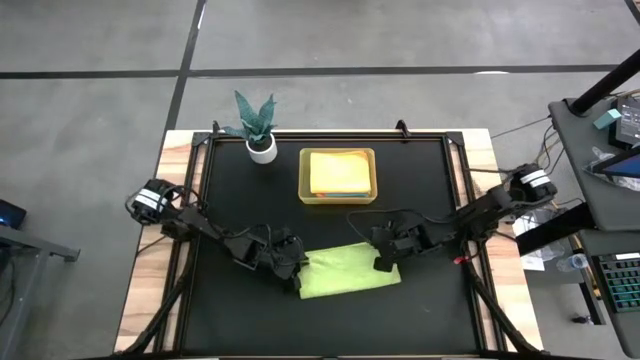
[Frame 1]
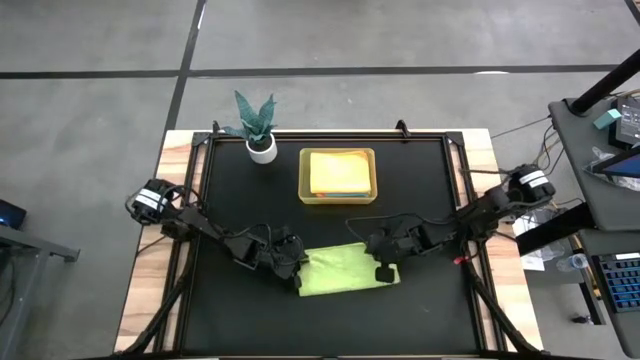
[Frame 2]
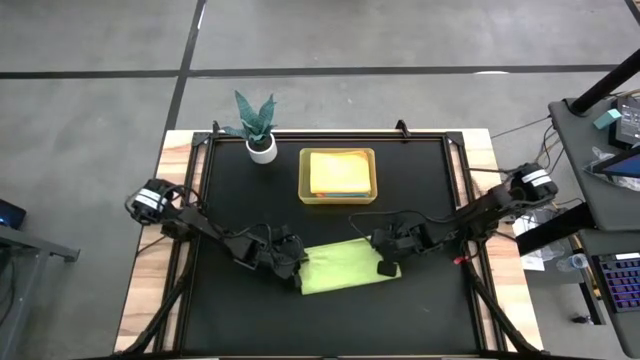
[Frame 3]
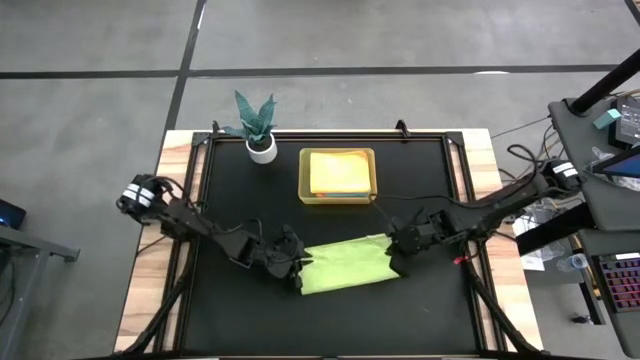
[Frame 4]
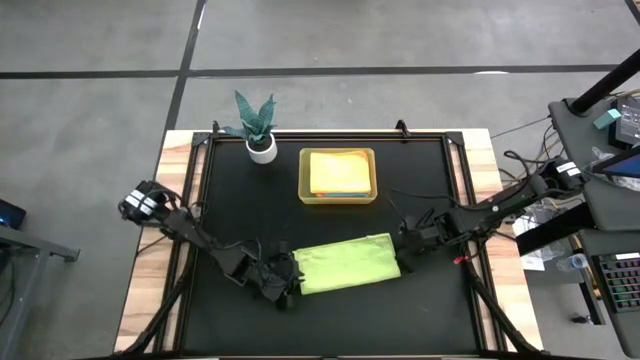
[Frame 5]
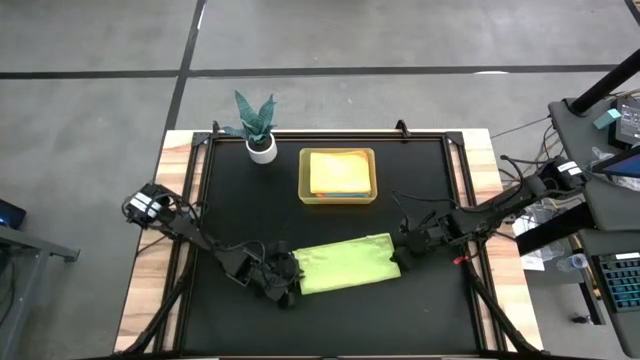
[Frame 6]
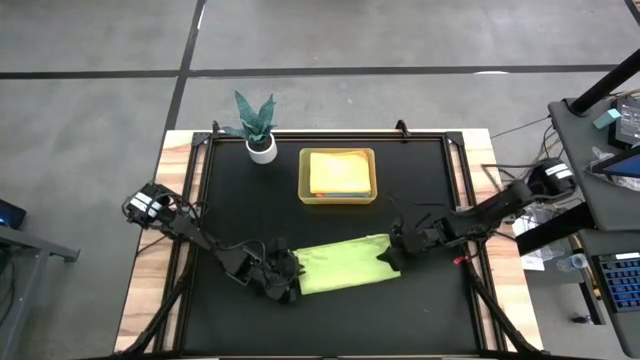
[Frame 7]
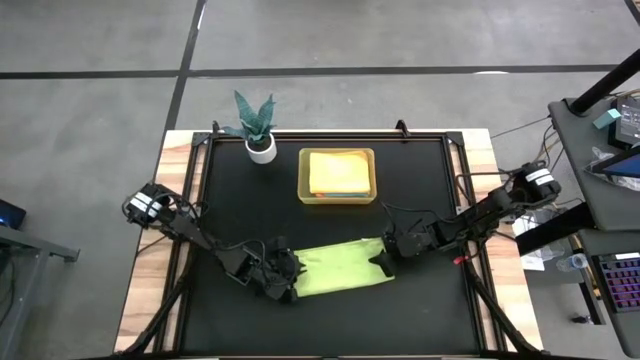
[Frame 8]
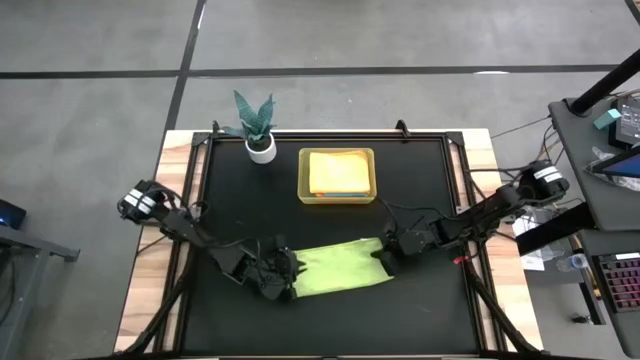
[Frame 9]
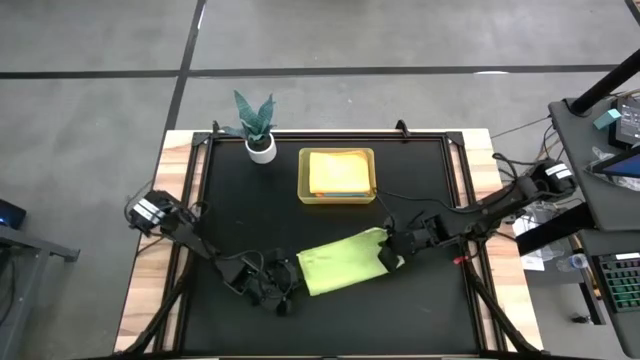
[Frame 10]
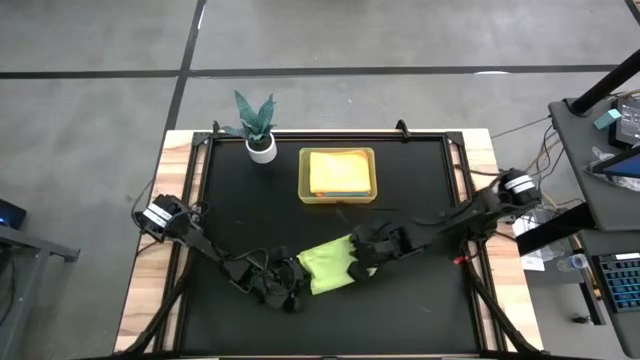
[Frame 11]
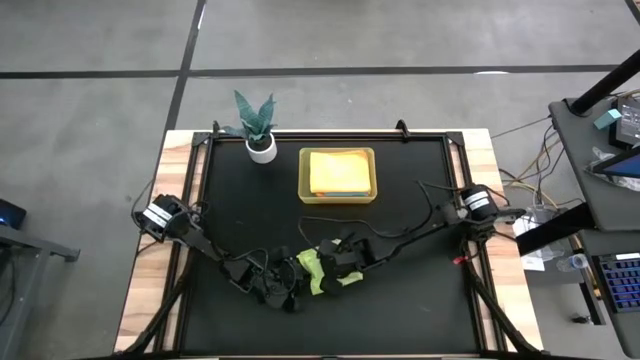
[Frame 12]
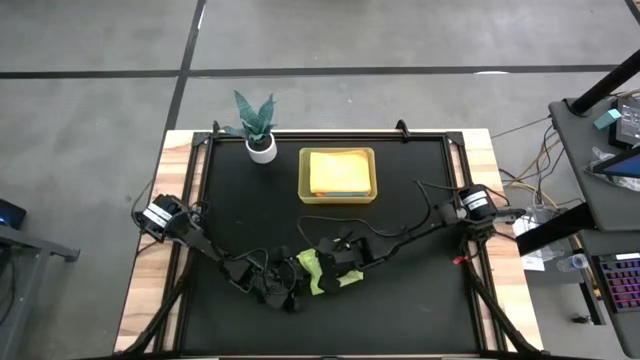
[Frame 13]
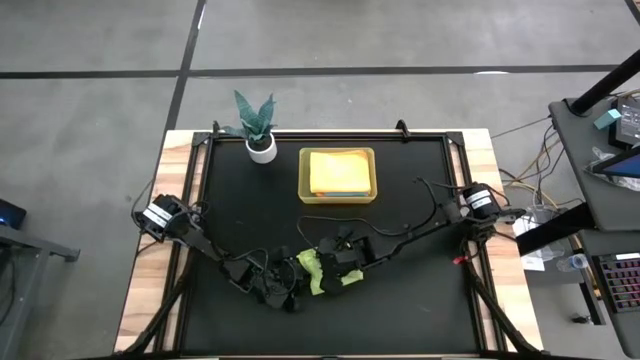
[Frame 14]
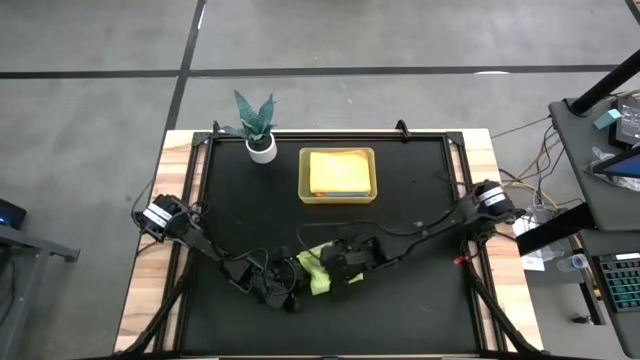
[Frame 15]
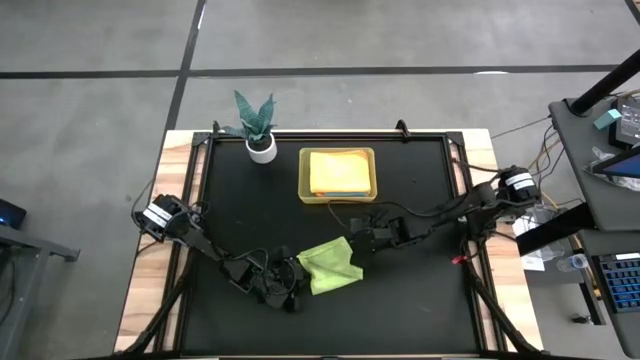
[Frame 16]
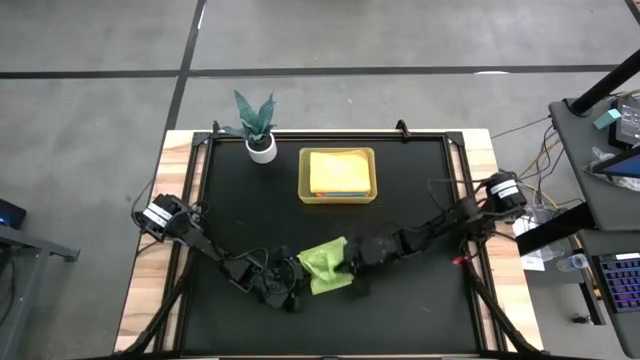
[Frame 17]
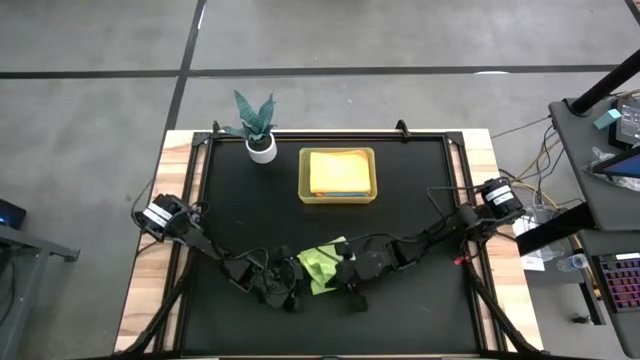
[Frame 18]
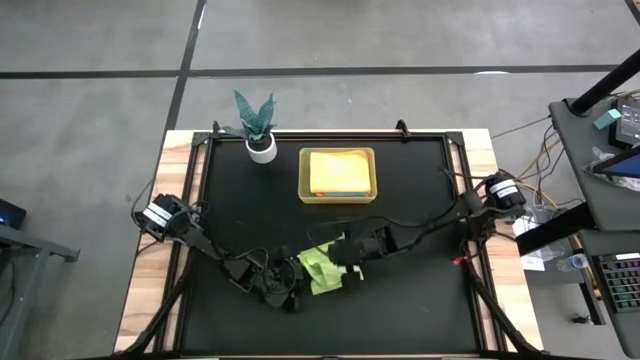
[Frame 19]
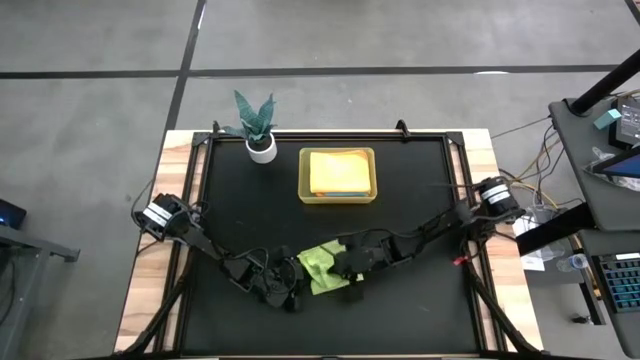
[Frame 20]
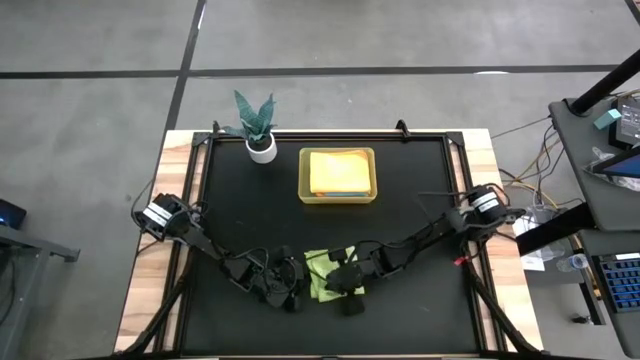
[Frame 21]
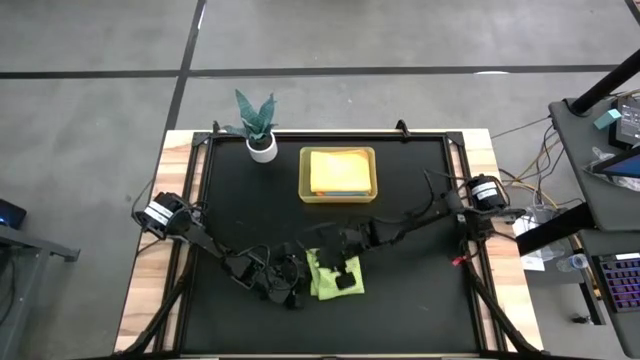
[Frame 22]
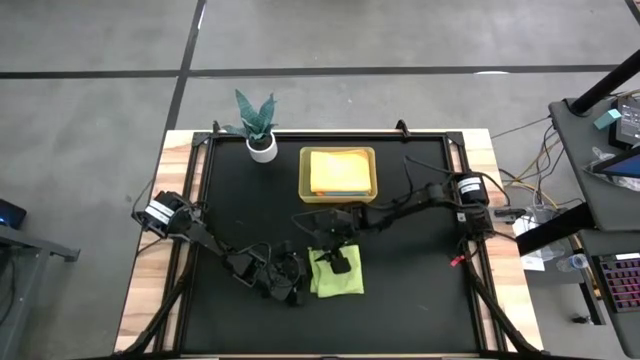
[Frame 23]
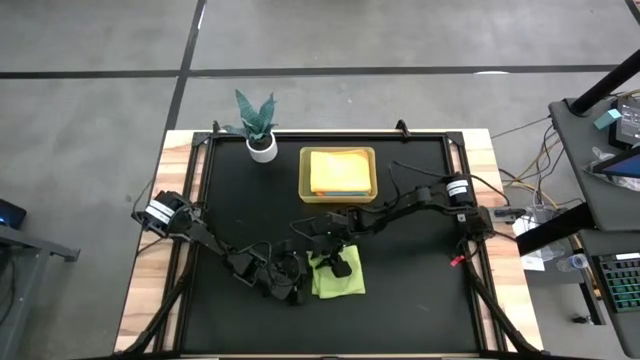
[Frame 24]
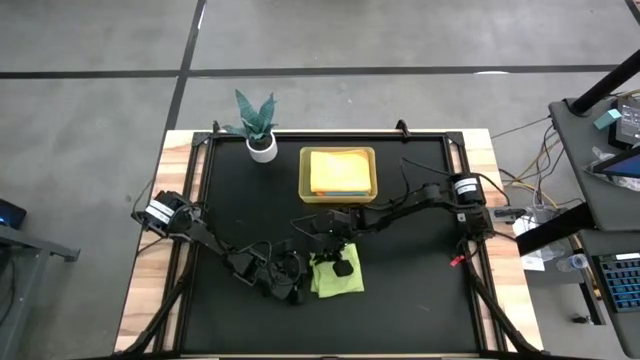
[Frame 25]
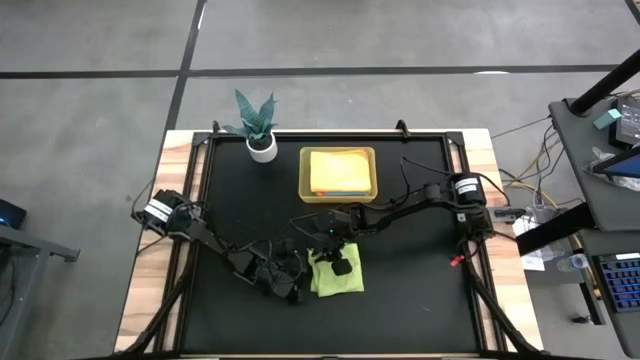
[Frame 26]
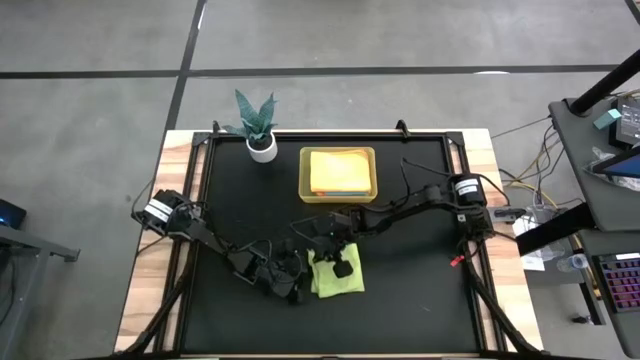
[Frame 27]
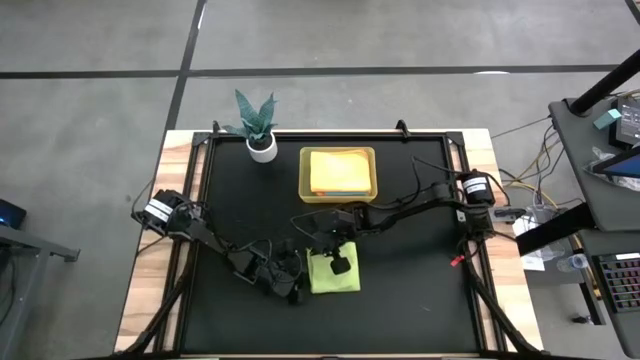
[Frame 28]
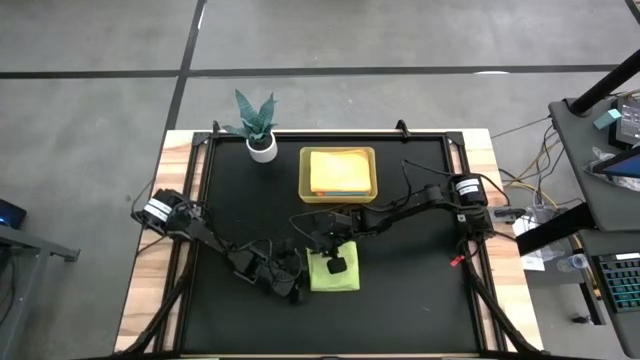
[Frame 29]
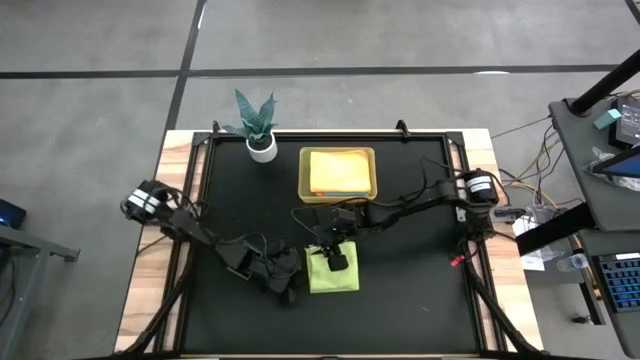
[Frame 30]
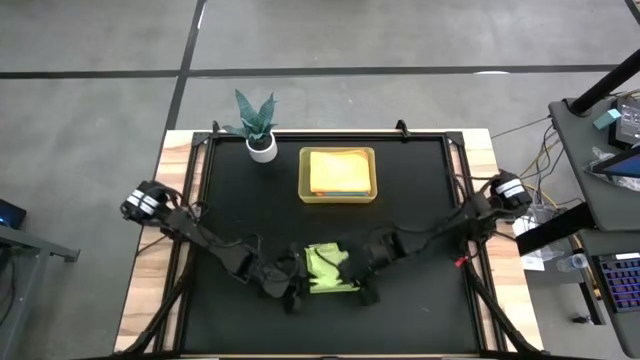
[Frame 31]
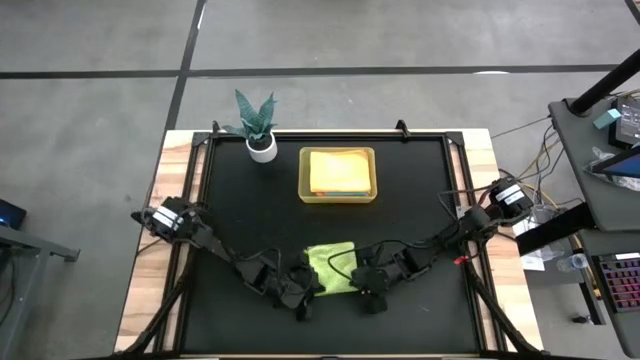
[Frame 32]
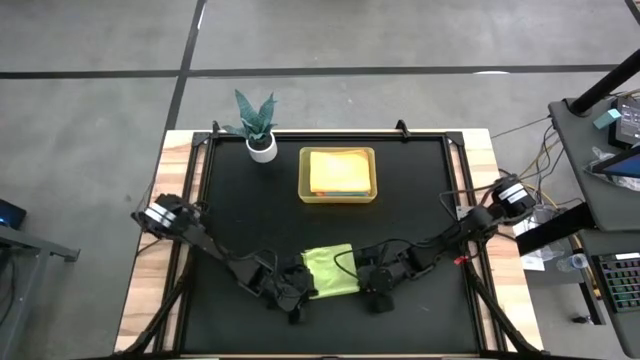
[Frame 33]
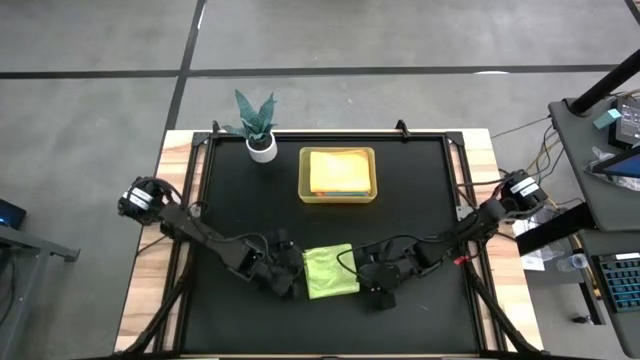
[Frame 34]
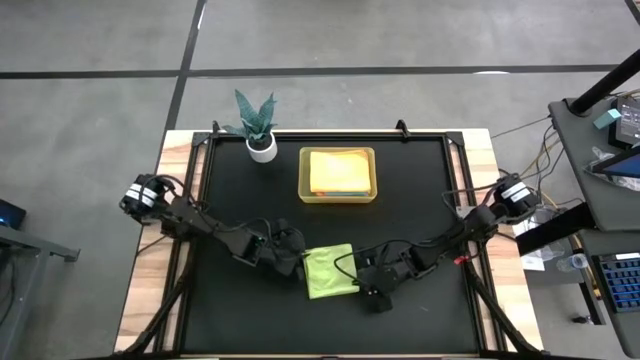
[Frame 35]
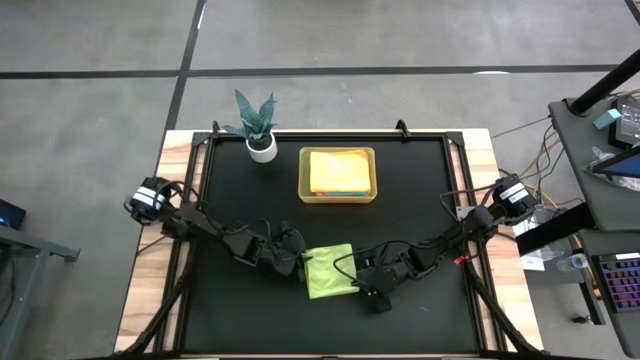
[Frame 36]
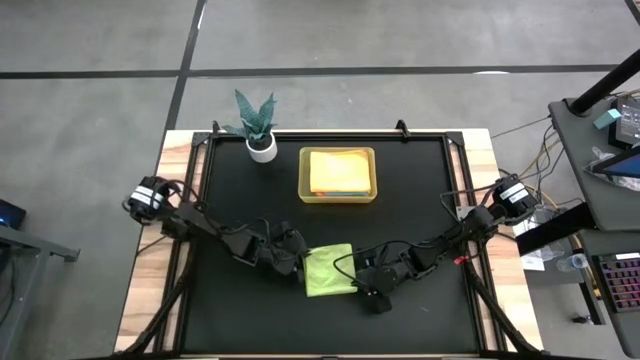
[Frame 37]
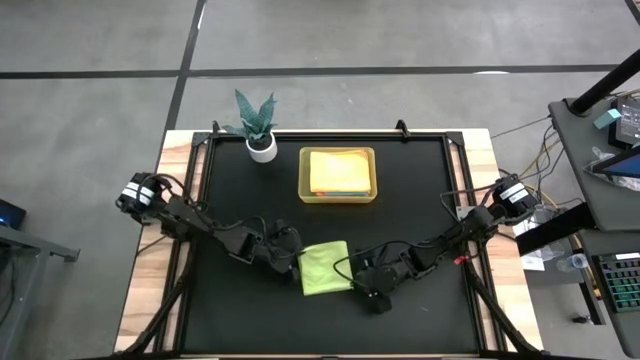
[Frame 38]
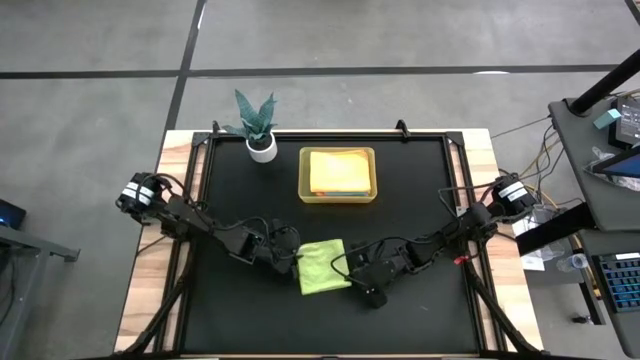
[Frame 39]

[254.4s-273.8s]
Task: Fold microfiber towels
Fold the green towel on the table
